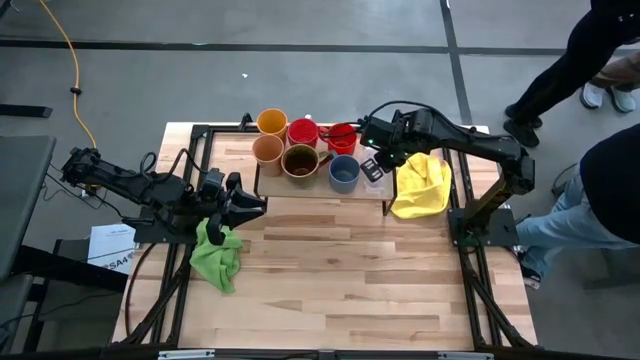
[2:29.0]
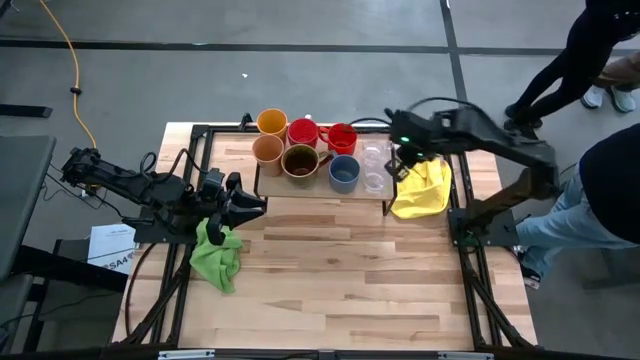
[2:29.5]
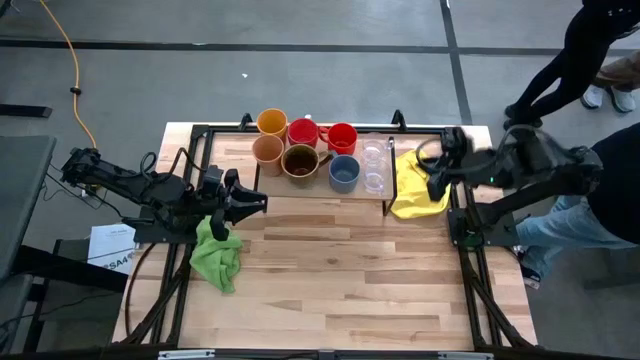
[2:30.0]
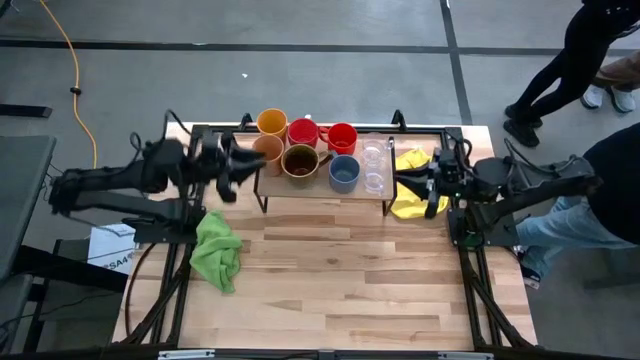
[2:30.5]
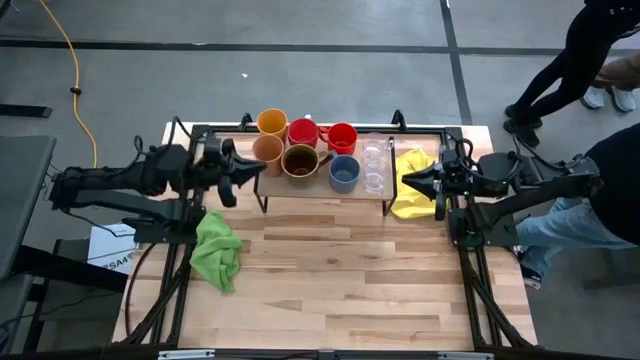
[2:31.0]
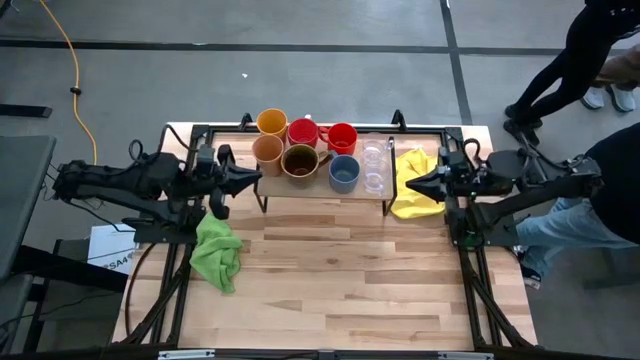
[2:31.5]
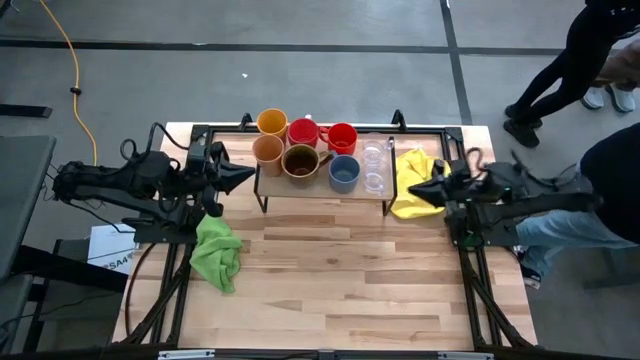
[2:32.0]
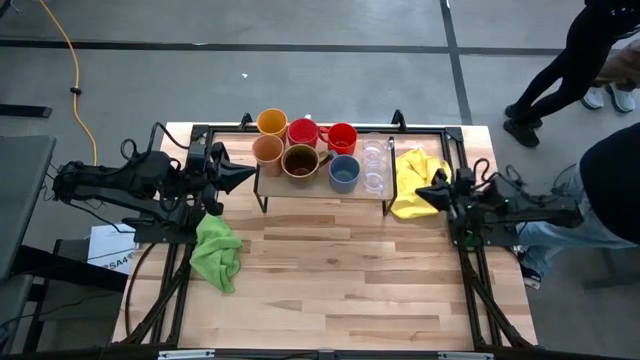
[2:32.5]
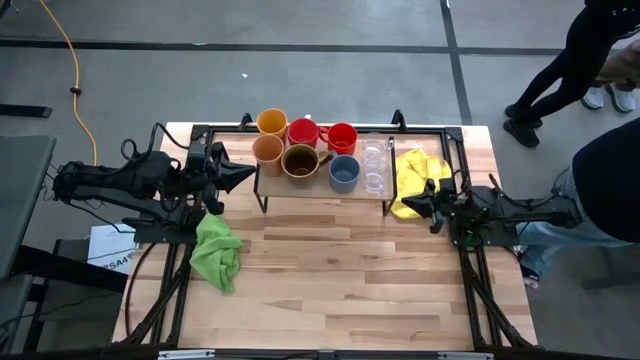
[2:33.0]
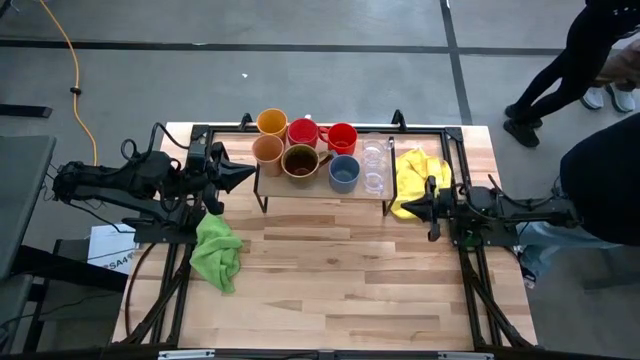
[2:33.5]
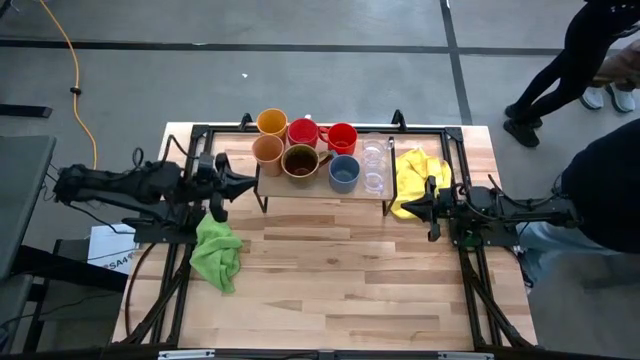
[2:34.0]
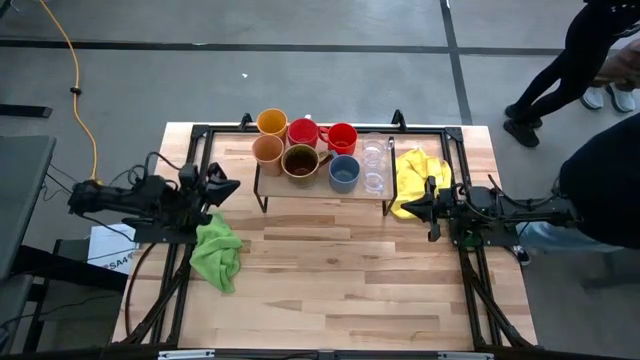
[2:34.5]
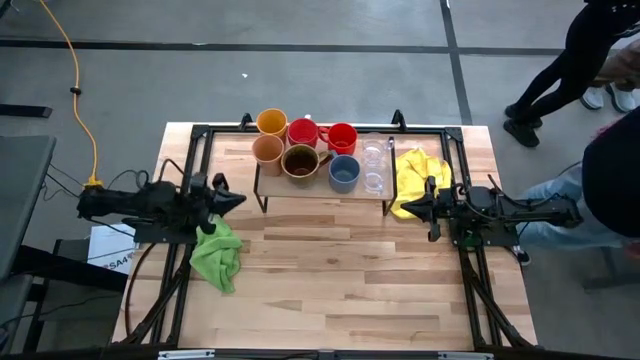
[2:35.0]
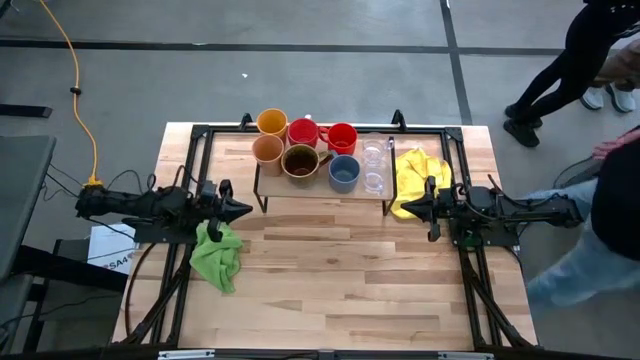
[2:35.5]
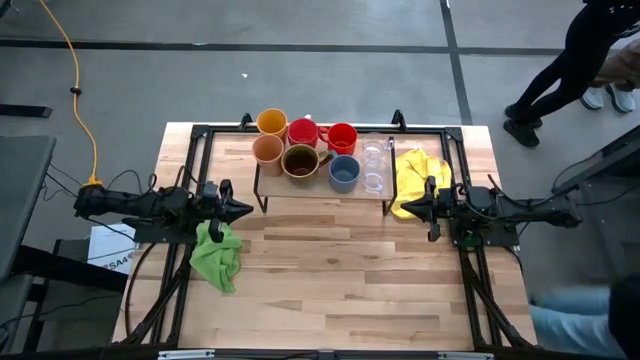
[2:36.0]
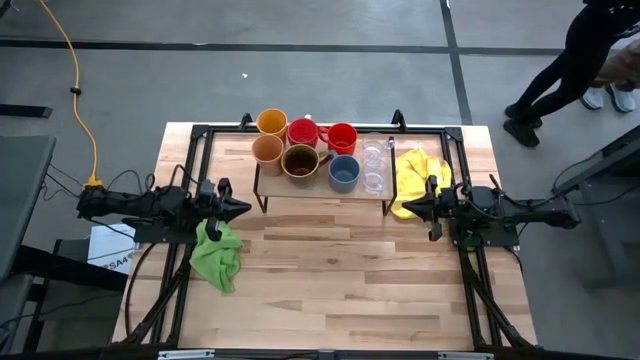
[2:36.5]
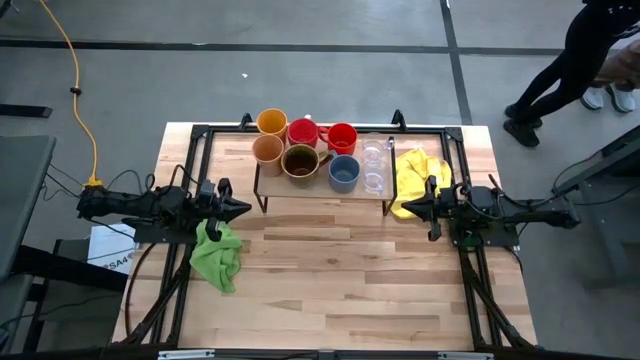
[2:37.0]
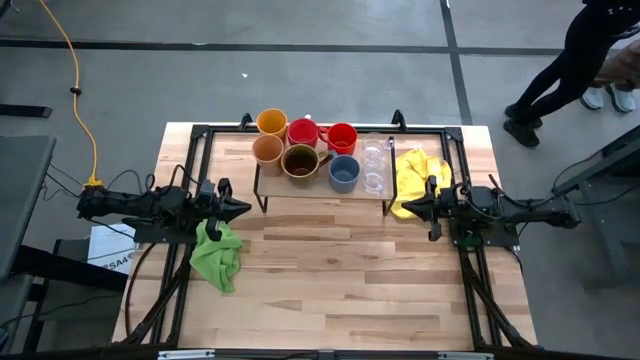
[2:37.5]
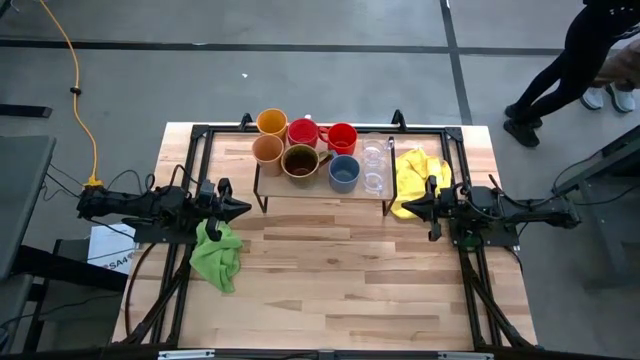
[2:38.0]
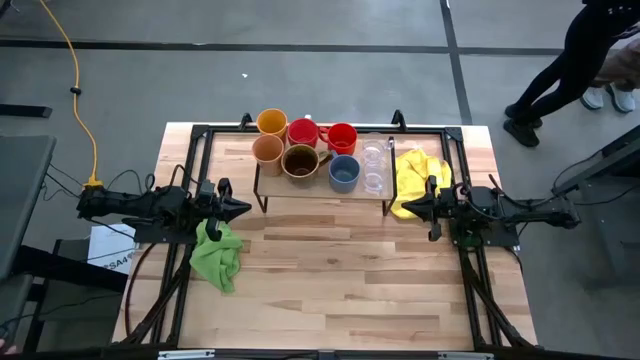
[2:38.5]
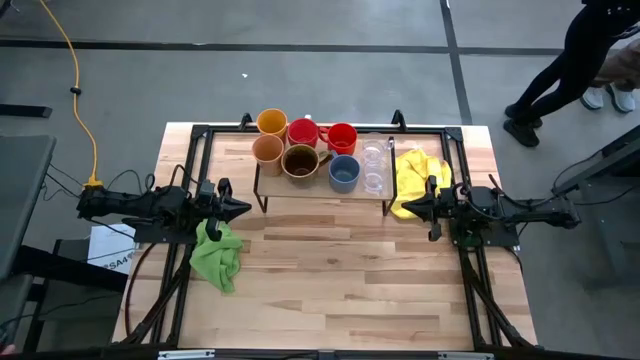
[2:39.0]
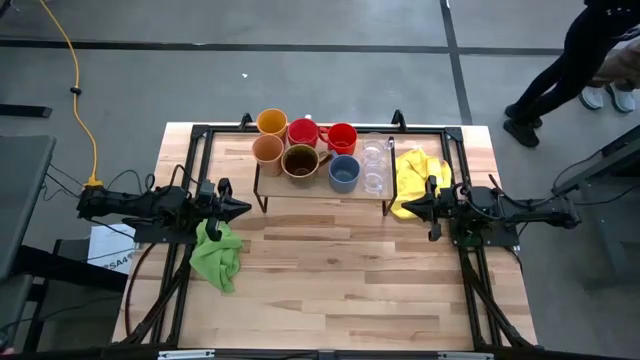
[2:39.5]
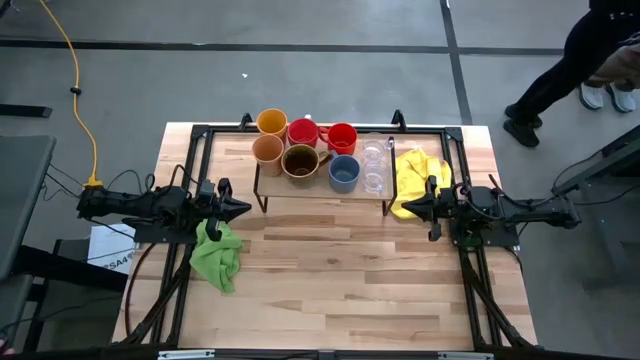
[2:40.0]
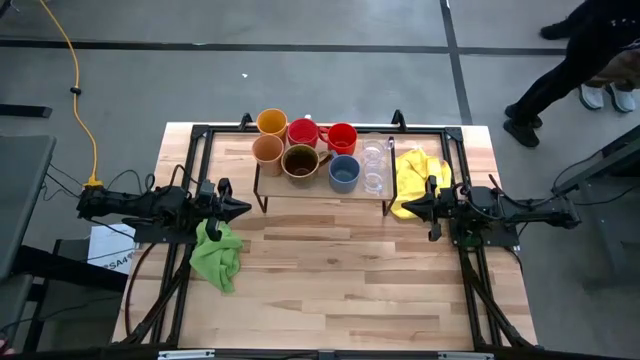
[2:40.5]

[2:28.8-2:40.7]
Task: Stack small to large cups/mugs on shelf
Return to Home Position

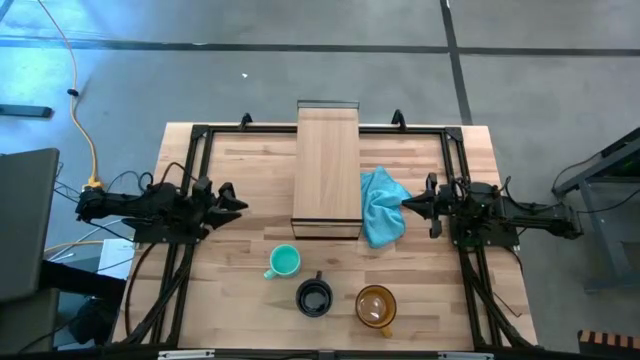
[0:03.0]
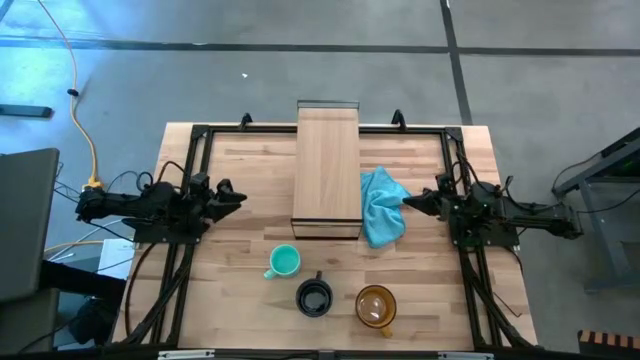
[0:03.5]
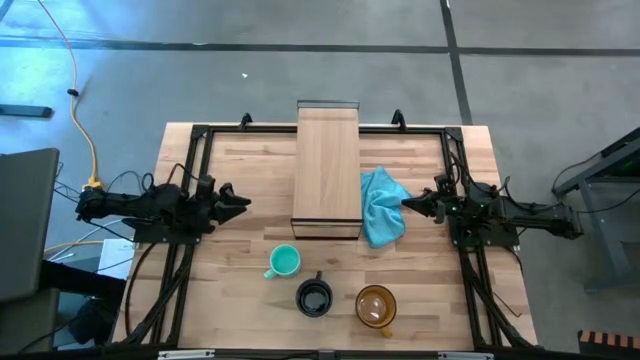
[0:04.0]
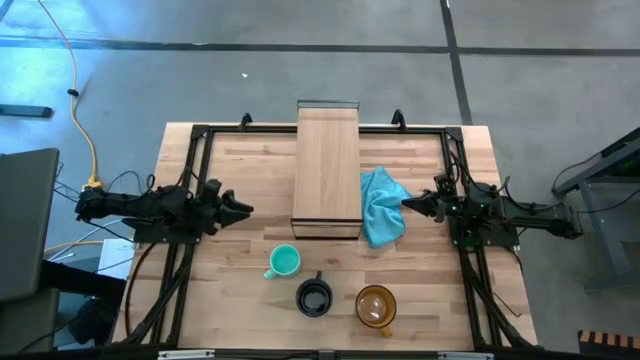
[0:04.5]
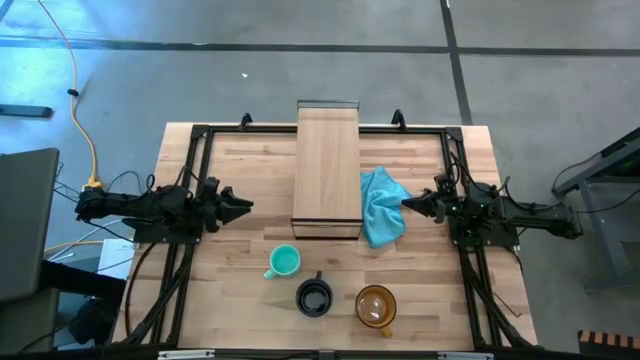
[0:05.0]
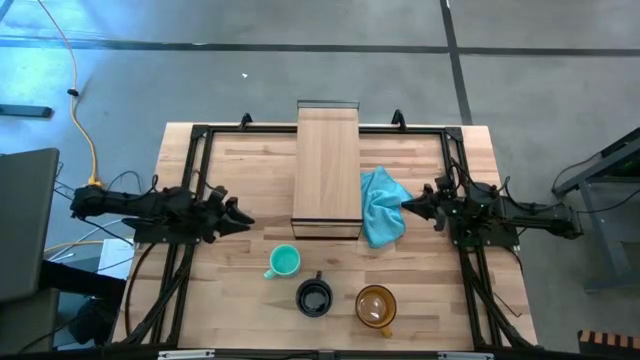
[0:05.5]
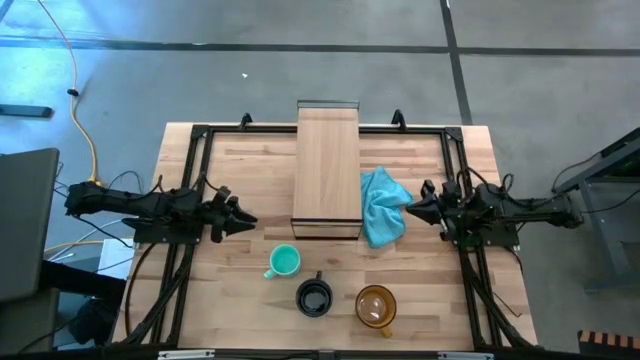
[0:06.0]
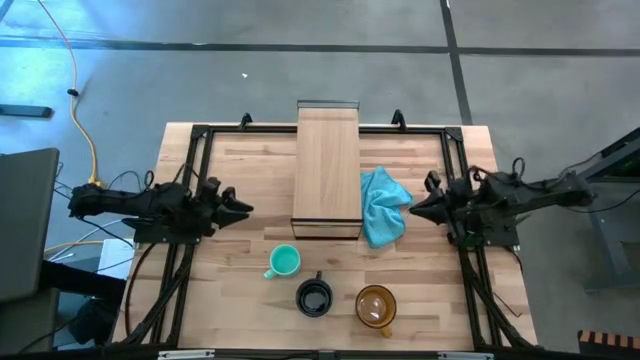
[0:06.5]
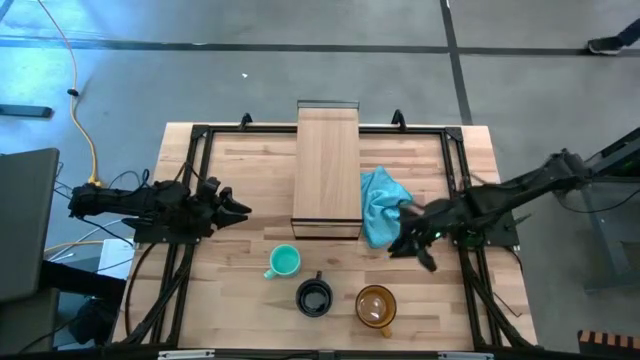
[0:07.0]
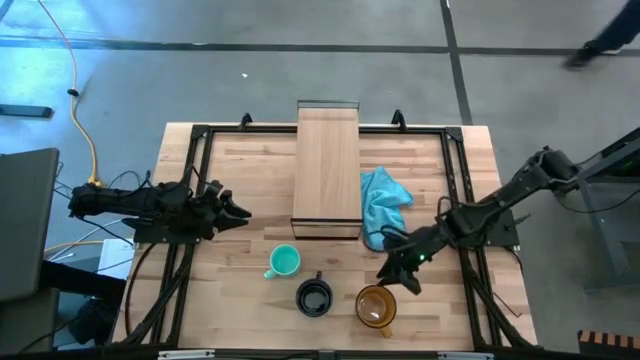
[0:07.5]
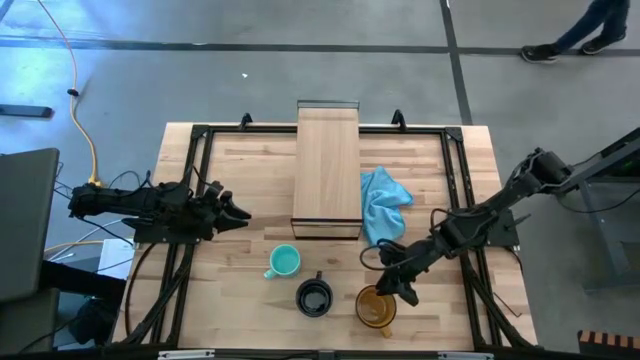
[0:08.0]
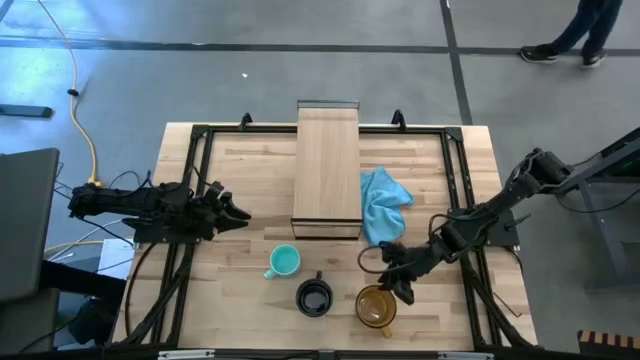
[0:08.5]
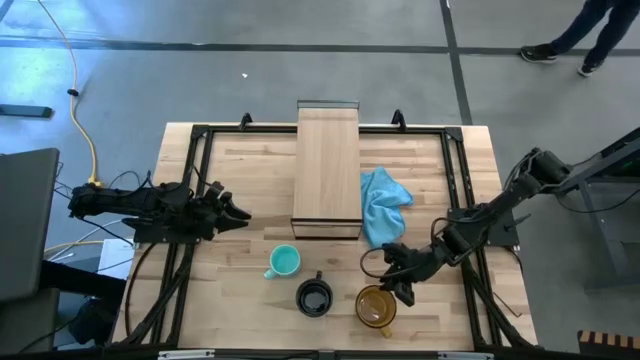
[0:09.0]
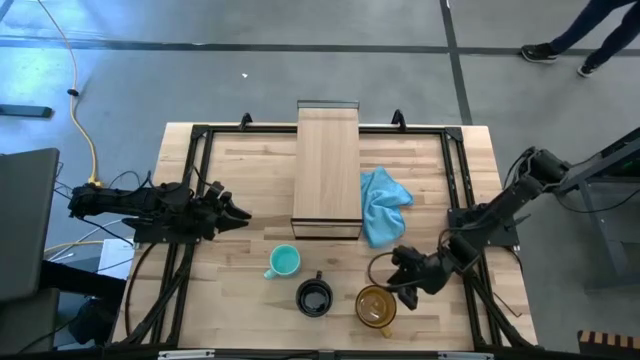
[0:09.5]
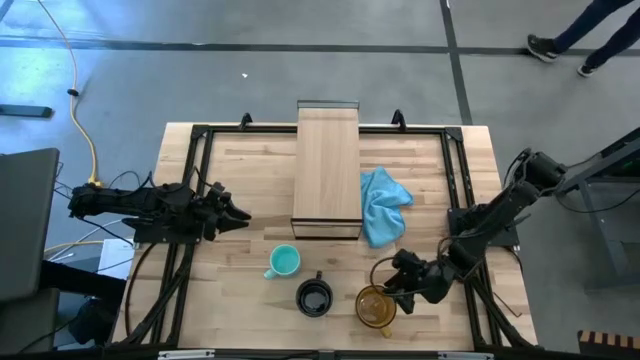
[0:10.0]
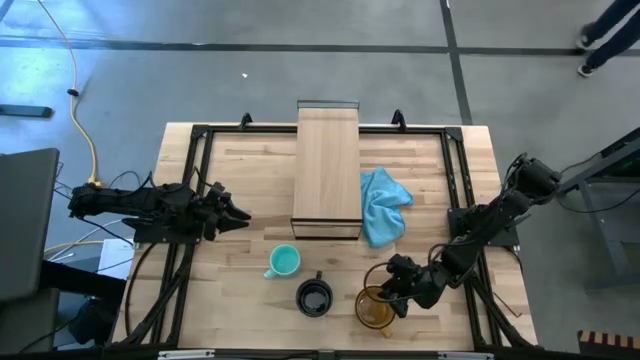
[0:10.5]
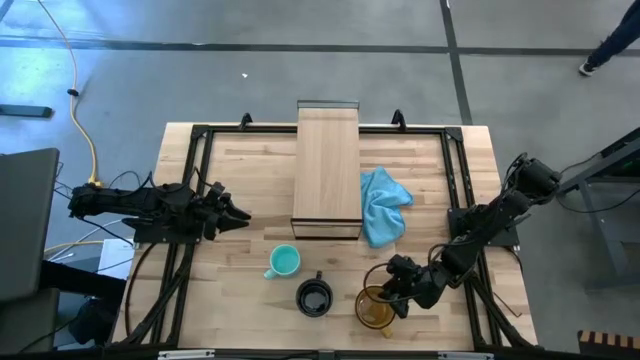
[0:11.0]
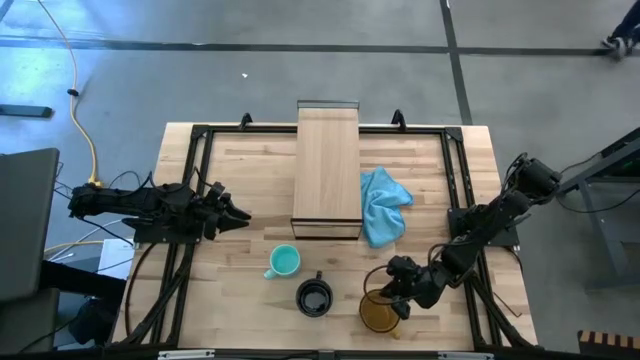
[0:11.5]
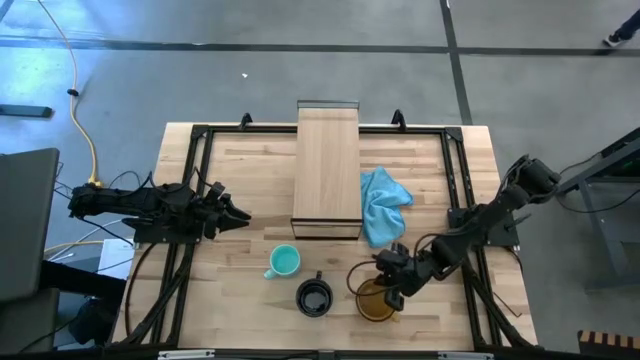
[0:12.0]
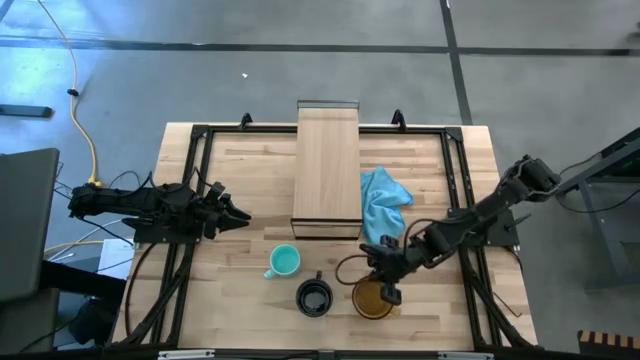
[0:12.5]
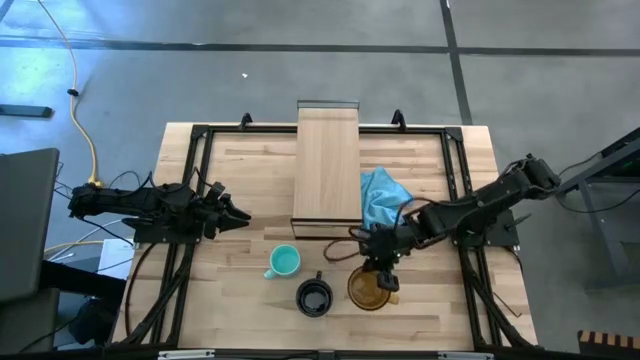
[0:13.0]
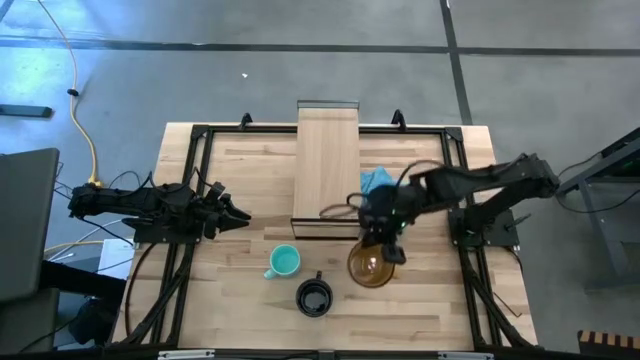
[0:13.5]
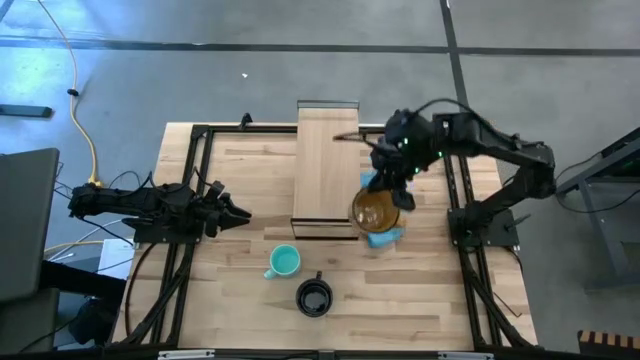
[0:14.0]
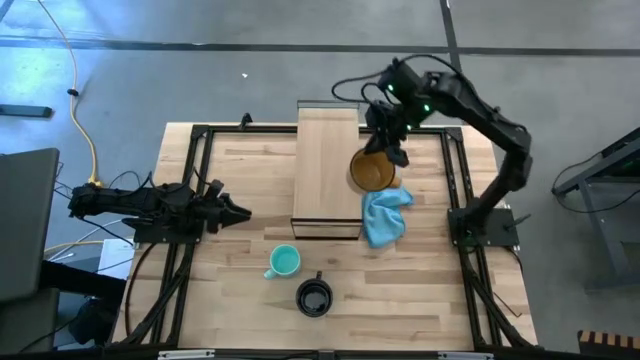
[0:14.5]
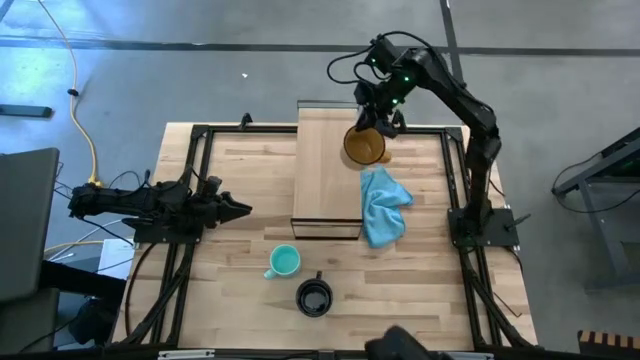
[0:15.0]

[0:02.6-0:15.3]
Task: Stack small to large cups/mugs on shelf
Put the yellow mug on the shelf
